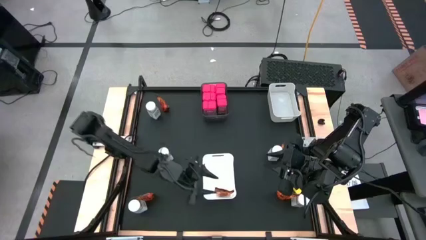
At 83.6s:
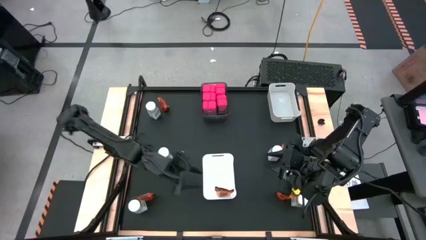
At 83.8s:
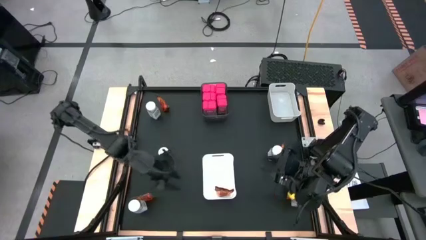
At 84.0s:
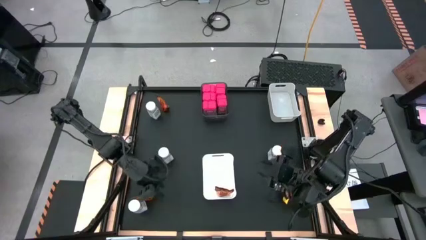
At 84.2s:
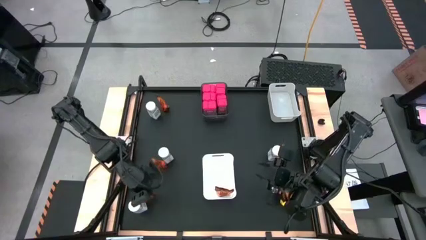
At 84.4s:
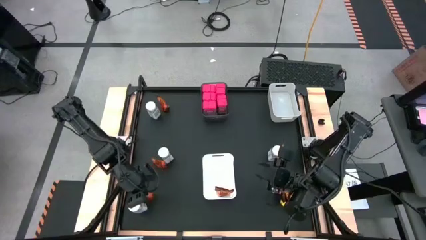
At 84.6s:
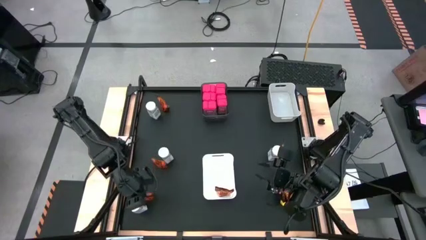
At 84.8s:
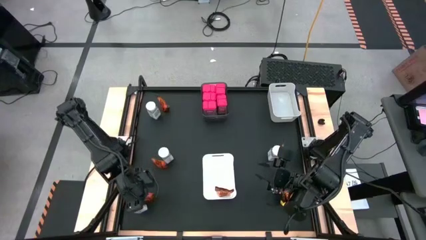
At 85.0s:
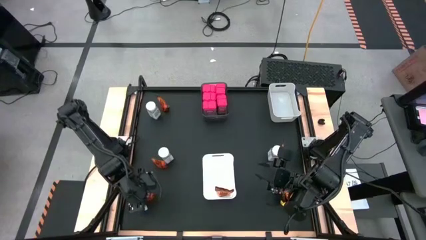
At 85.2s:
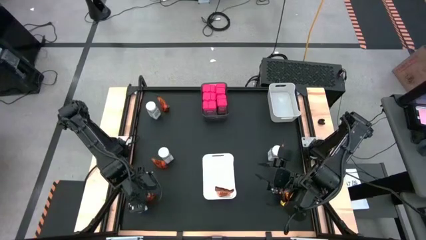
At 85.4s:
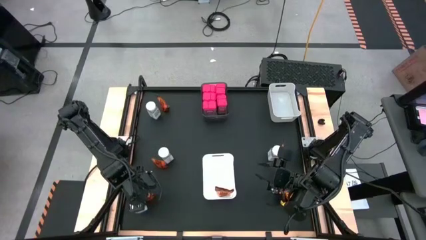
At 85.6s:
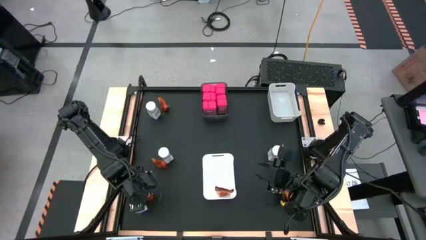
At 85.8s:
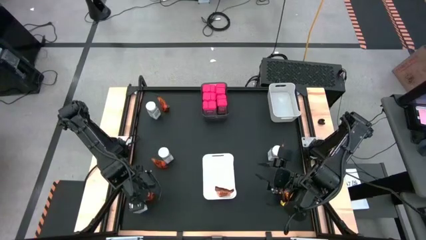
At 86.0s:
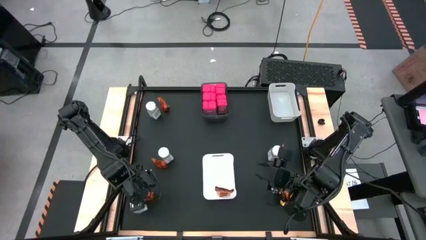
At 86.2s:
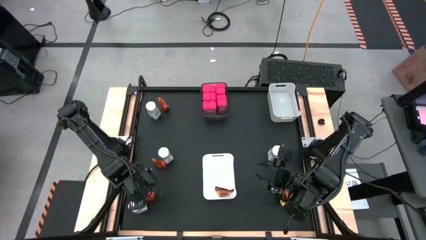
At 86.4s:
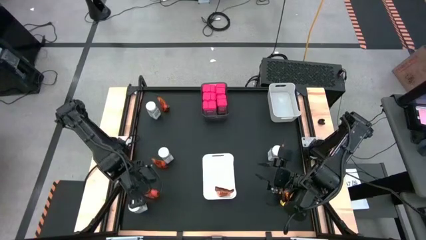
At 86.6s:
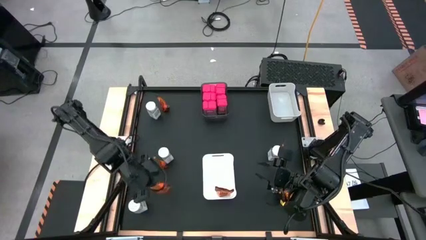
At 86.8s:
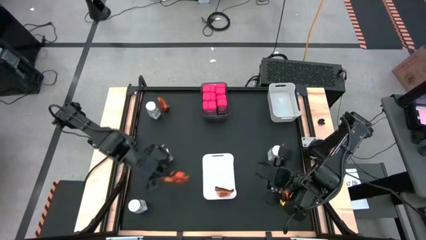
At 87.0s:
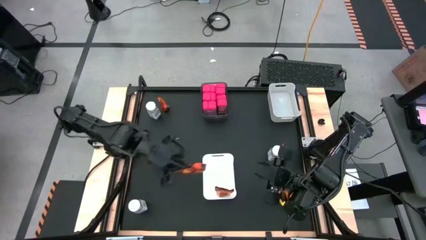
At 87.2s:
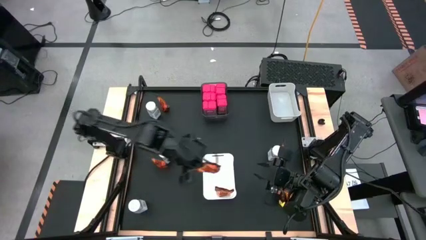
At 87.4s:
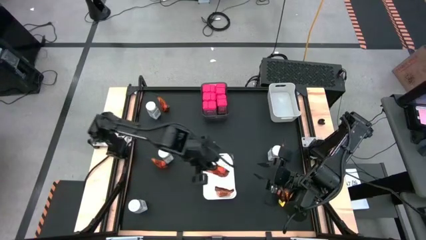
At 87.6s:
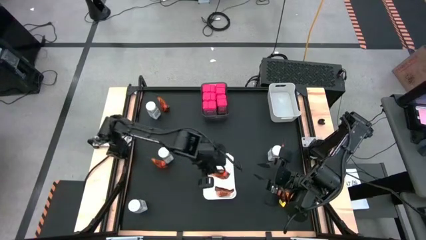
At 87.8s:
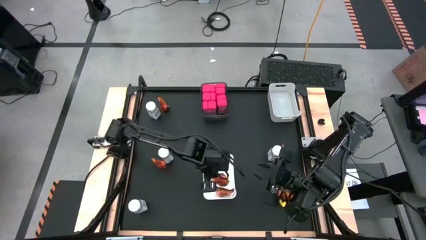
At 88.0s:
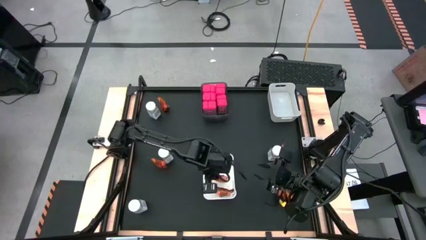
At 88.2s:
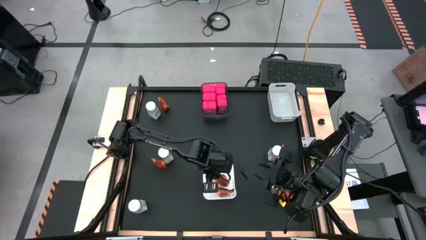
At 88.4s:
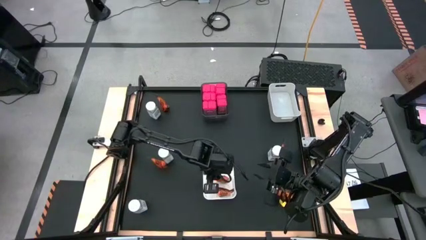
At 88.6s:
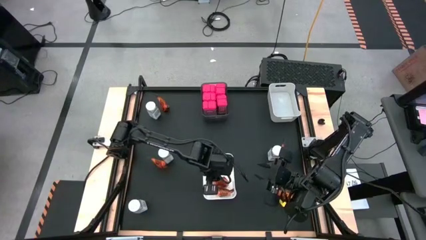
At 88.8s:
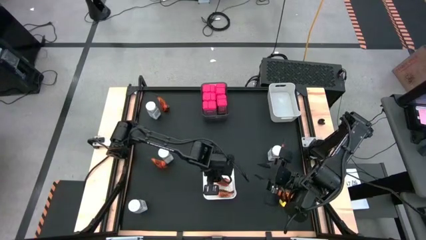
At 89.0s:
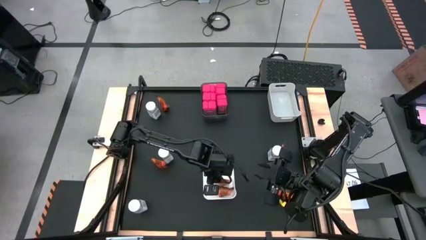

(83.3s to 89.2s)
Task: Sort spices by type
Put the orange seasoning pack into the white bin

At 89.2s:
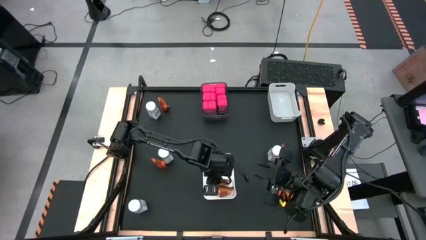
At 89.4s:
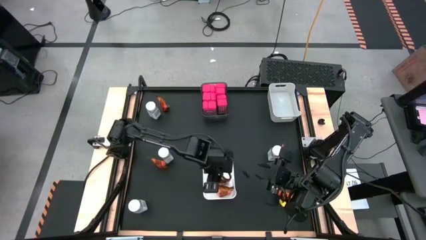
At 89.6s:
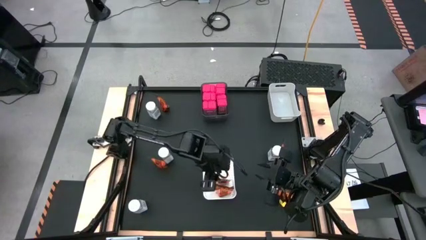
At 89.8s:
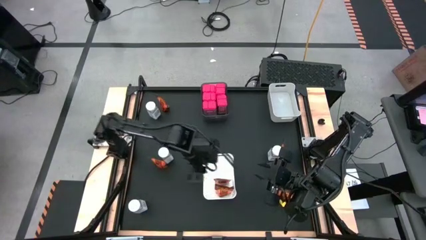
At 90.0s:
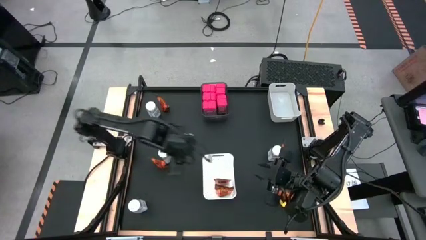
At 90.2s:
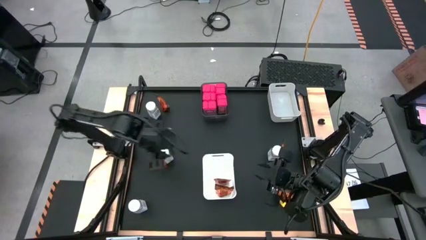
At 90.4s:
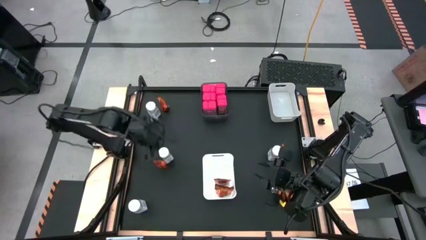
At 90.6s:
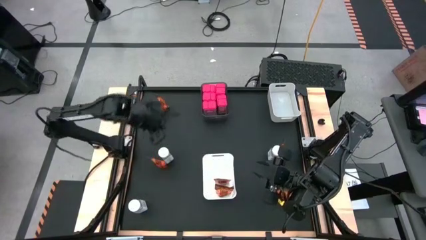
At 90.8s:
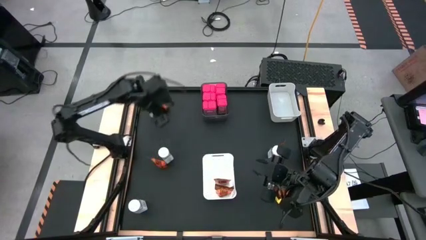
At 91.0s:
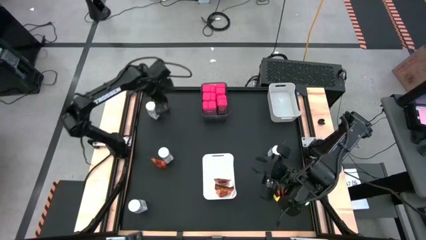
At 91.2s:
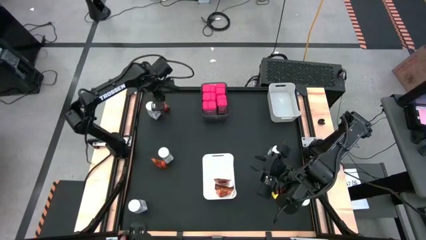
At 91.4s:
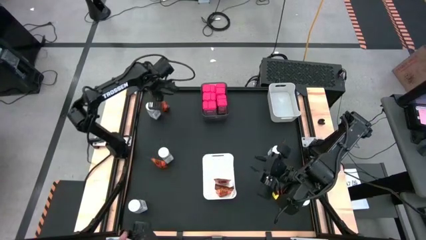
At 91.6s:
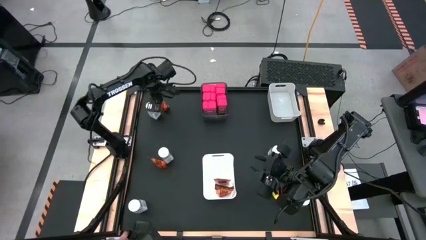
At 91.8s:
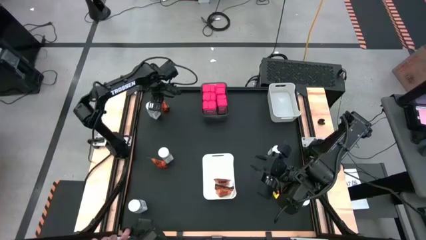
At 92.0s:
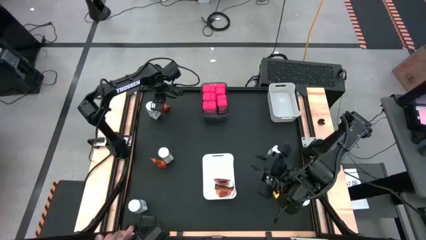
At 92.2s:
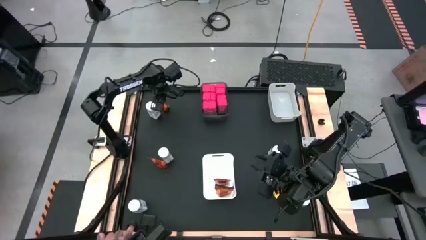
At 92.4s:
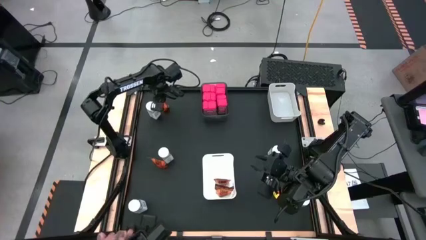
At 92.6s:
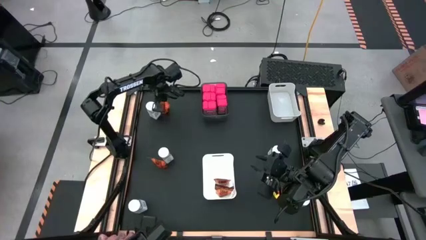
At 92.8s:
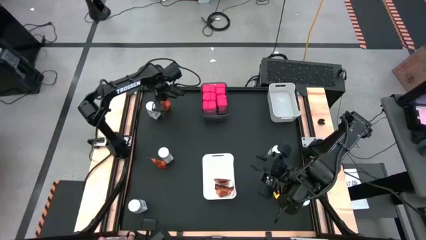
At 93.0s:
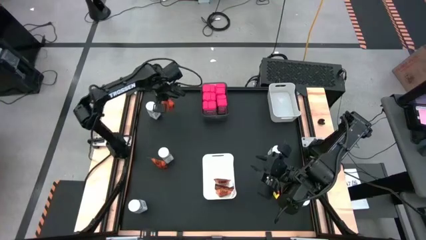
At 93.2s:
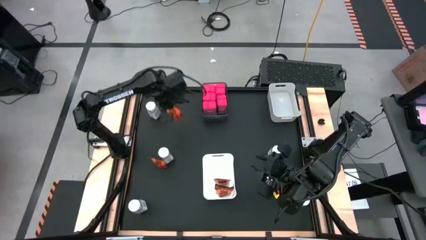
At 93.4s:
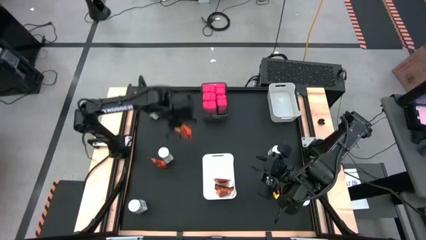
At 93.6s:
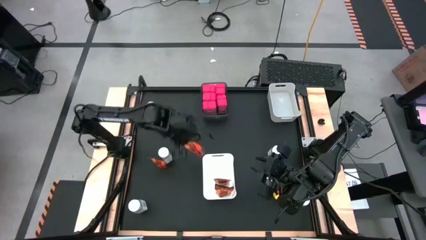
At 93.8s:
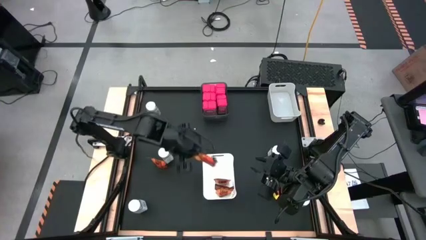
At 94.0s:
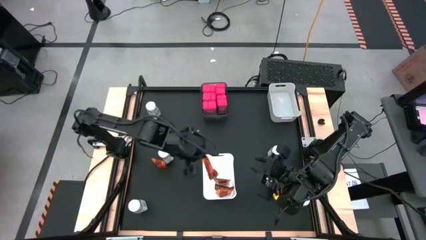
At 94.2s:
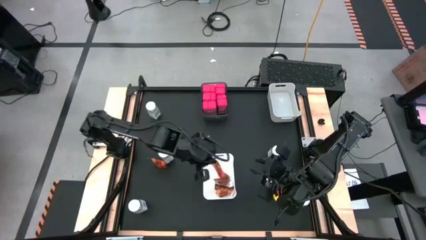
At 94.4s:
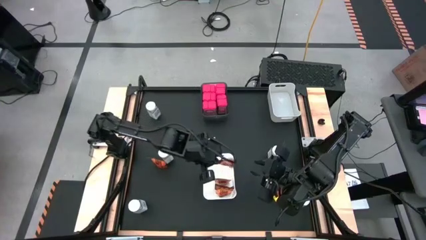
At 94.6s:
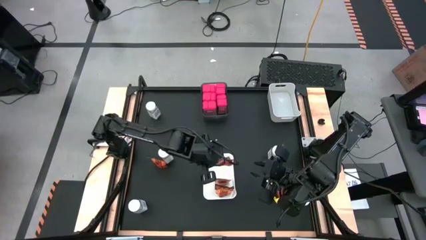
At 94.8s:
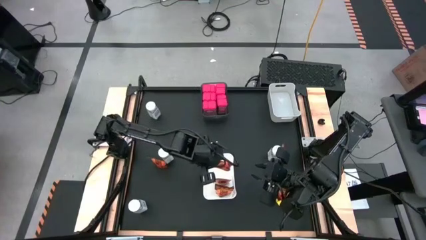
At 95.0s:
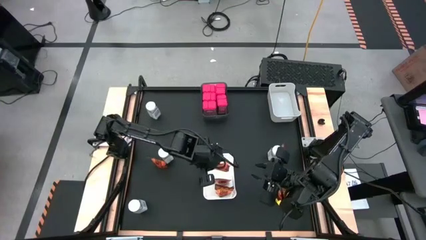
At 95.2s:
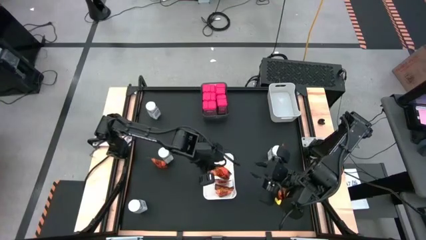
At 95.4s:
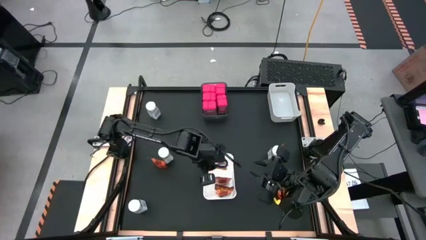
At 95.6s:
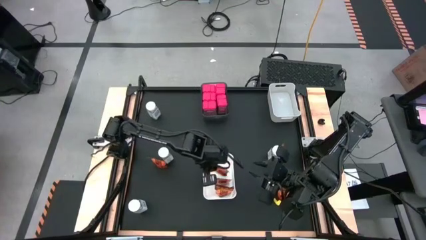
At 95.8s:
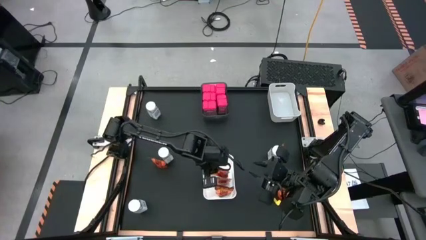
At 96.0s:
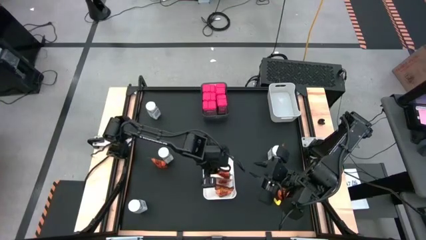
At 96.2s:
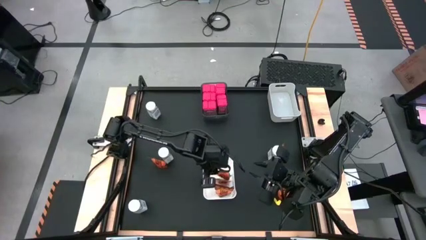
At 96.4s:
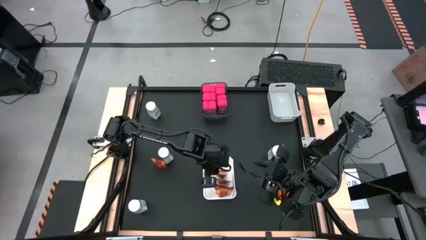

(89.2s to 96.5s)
Put the orange seasoning pack into the white bin

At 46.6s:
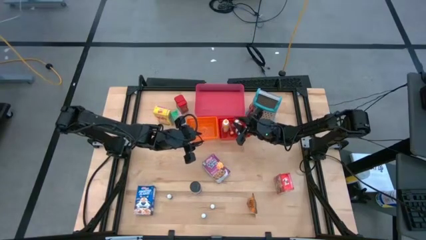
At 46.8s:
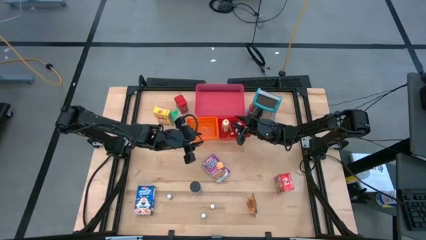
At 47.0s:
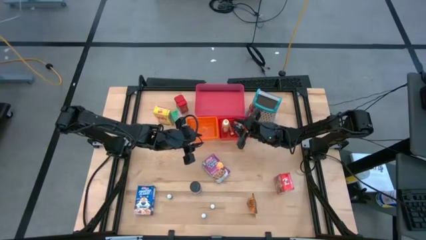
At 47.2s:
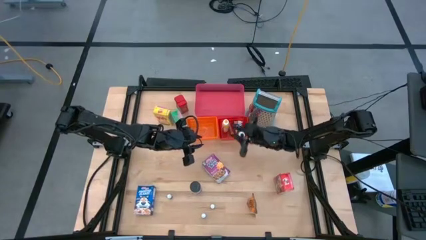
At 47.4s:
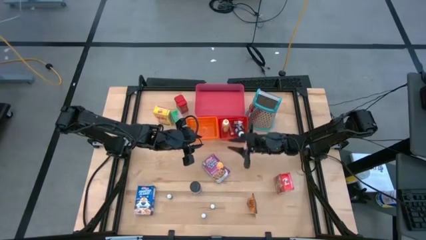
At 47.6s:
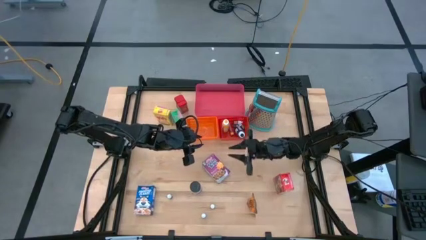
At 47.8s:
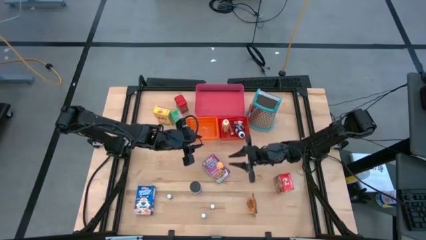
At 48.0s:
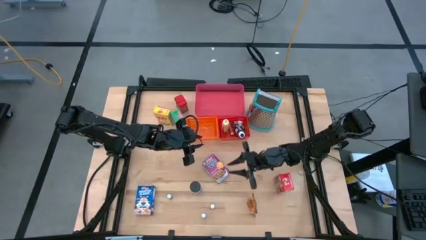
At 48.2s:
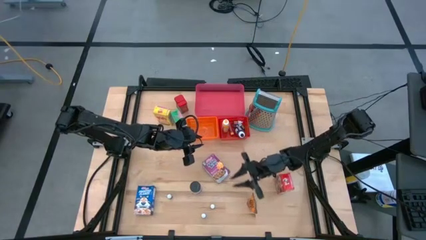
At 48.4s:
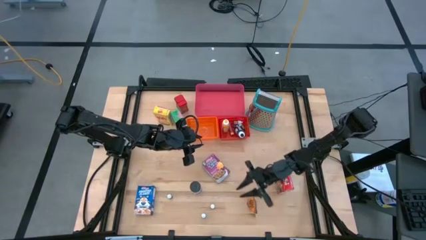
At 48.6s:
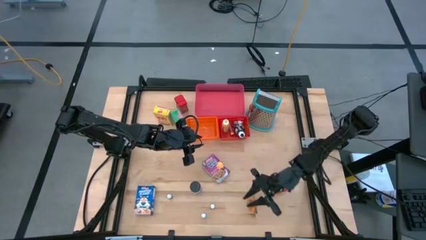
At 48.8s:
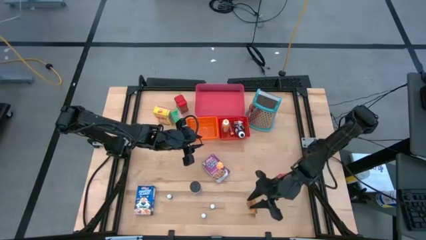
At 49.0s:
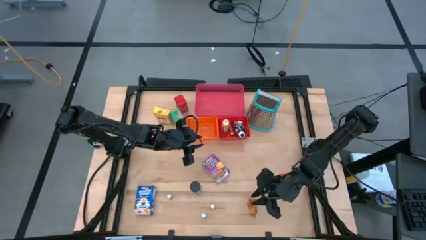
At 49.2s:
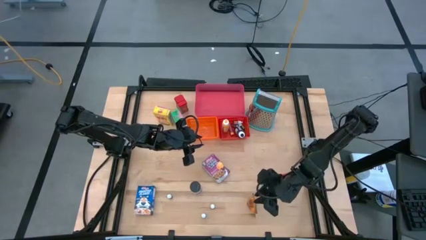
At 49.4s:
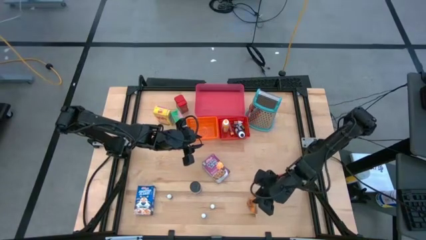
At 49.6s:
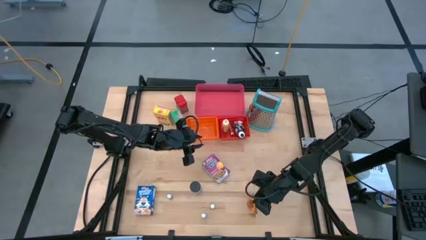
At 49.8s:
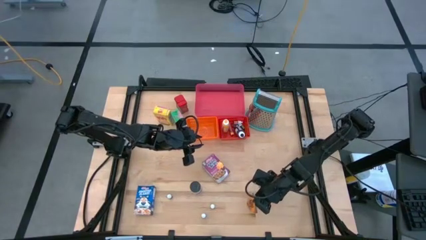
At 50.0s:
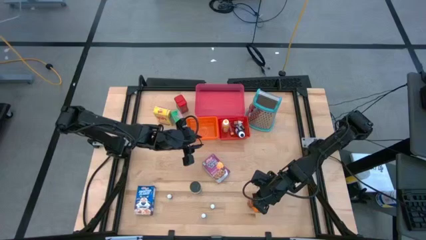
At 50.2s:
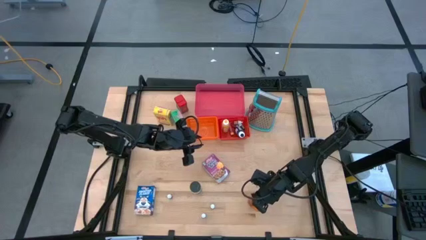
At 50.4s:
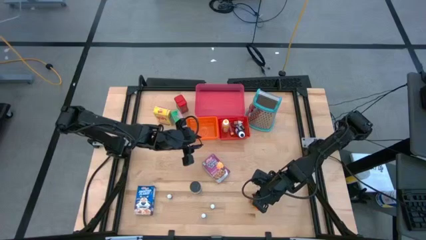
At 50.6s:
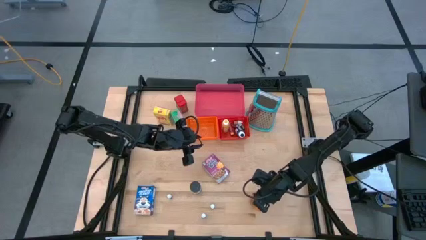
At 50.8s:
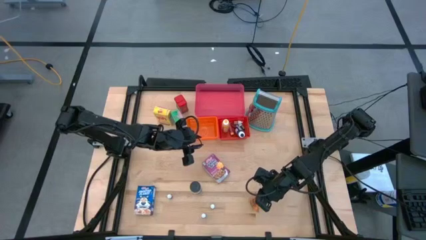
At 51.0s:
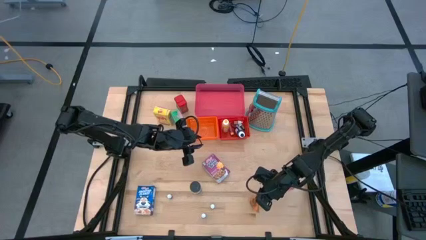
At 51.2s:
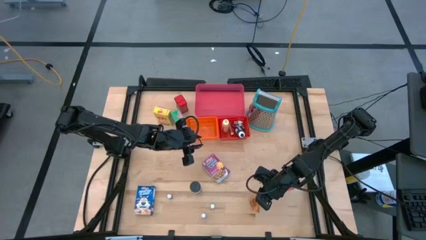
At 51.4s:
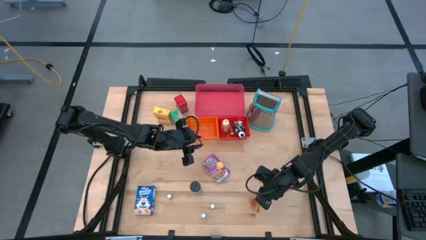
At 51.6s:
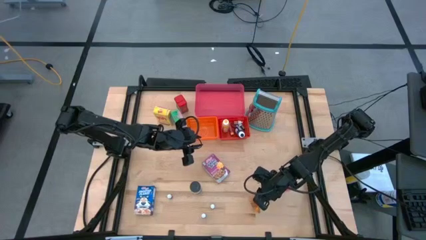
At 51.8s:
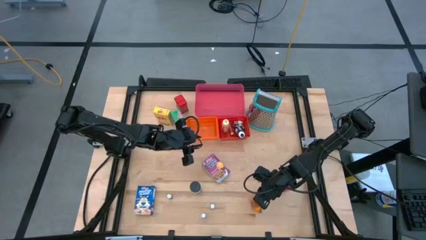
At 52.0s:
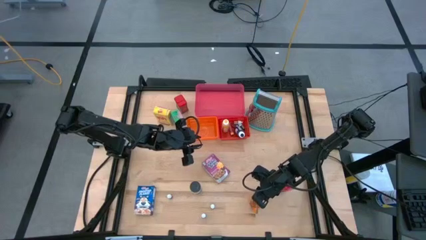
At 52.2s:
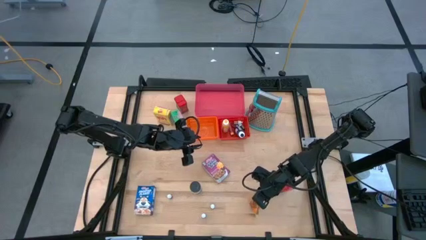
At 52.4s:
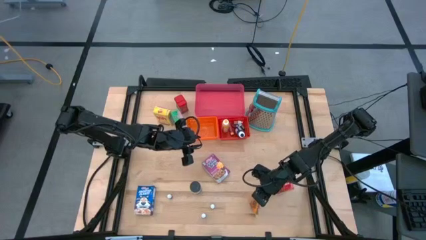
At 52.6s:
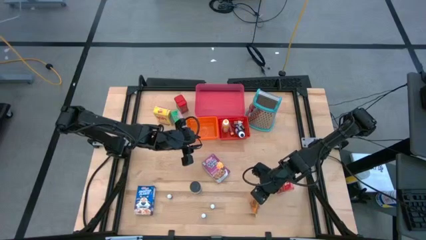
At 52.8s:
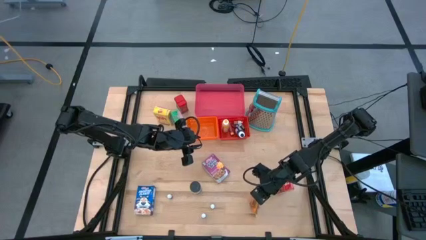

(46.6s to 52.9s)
Task: Pick & Place Kitchen Items
Put the orange seasoning bag into the orange bin
